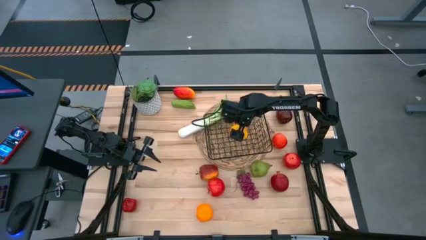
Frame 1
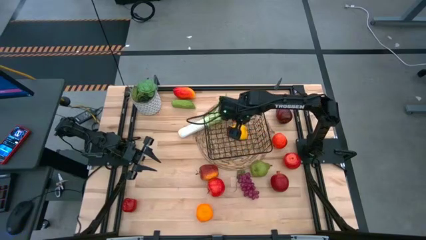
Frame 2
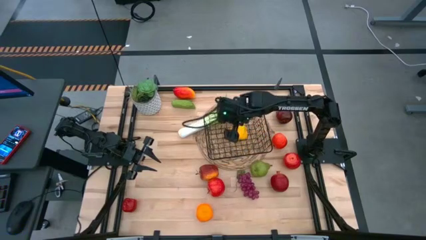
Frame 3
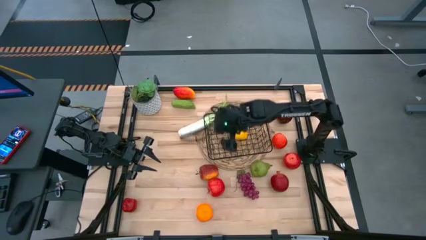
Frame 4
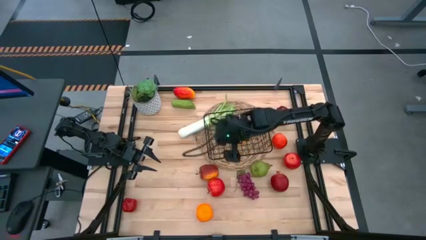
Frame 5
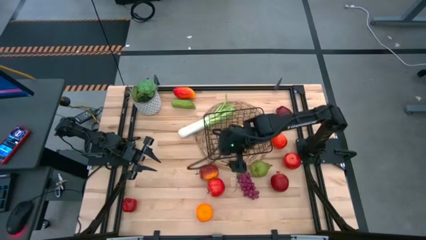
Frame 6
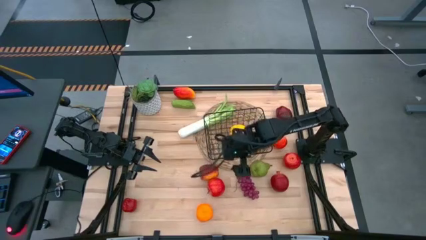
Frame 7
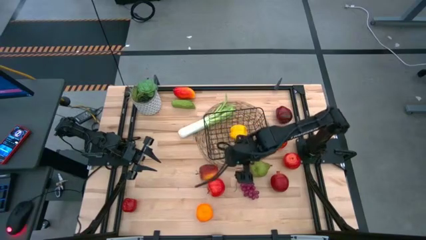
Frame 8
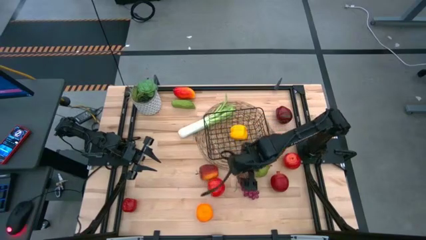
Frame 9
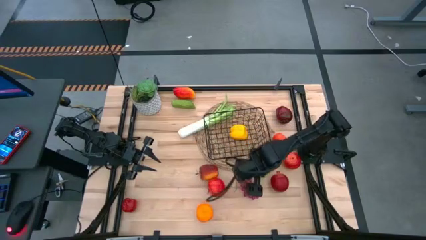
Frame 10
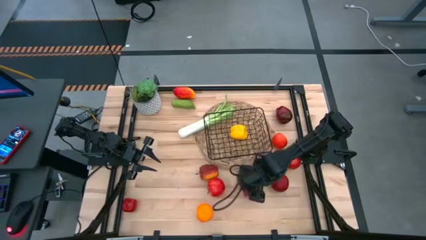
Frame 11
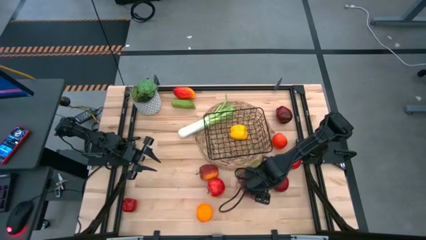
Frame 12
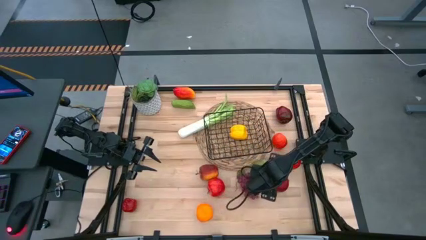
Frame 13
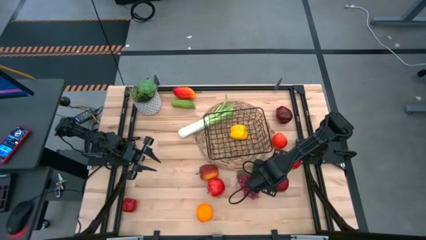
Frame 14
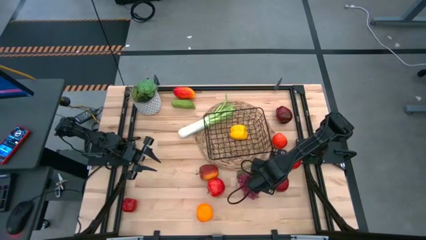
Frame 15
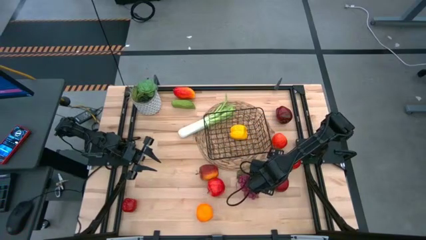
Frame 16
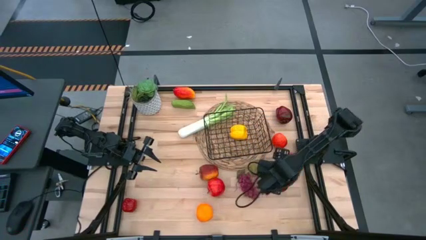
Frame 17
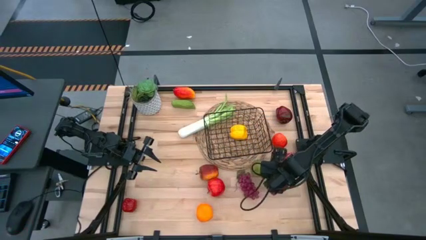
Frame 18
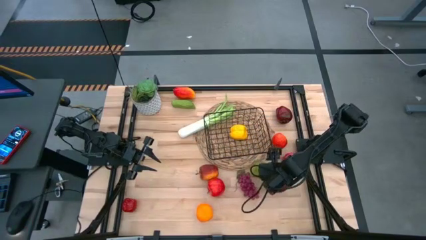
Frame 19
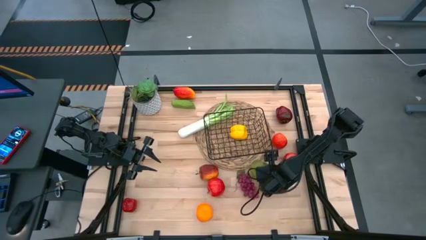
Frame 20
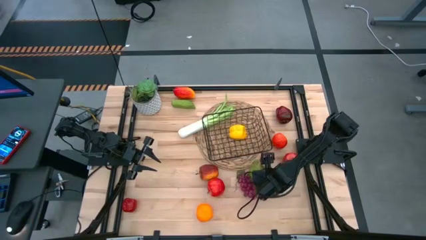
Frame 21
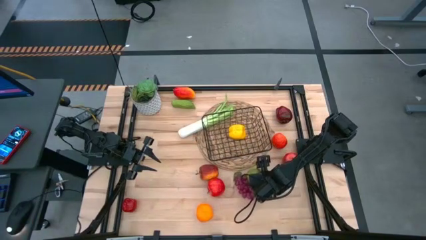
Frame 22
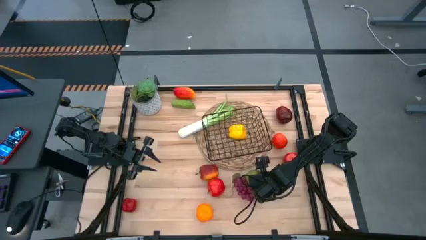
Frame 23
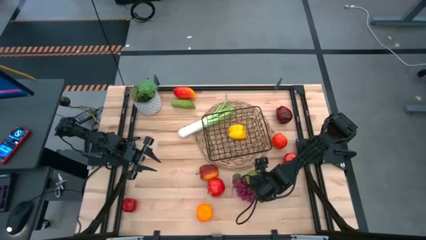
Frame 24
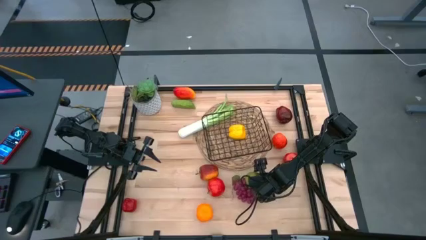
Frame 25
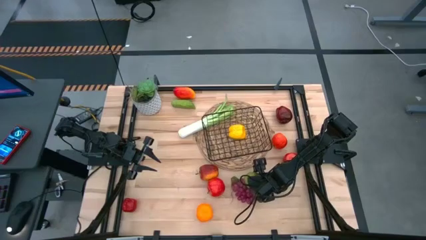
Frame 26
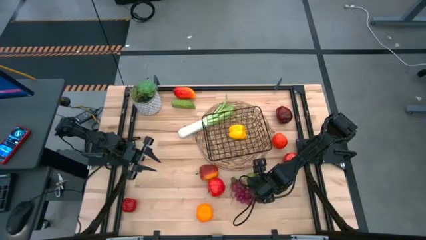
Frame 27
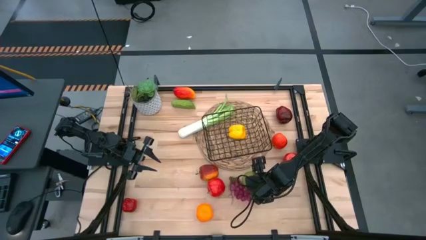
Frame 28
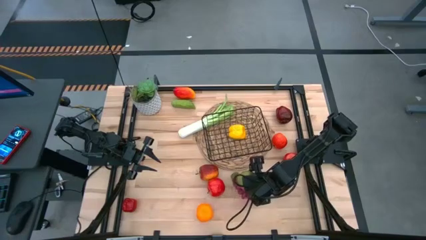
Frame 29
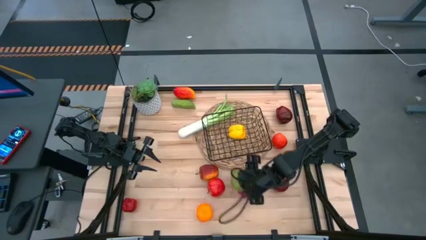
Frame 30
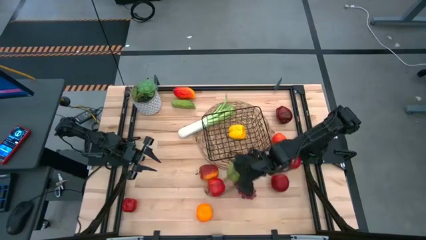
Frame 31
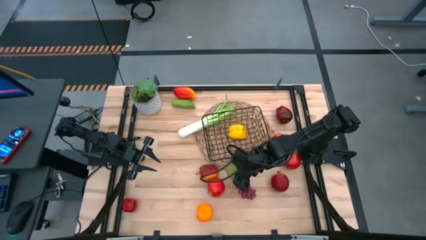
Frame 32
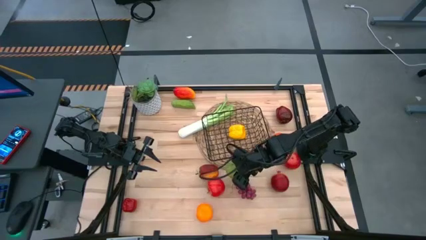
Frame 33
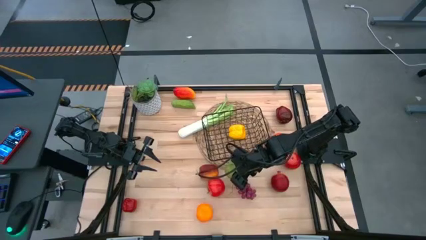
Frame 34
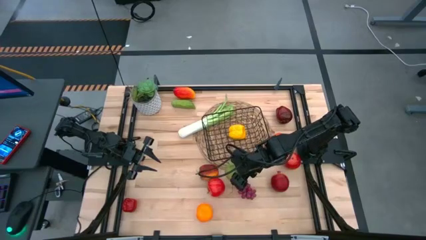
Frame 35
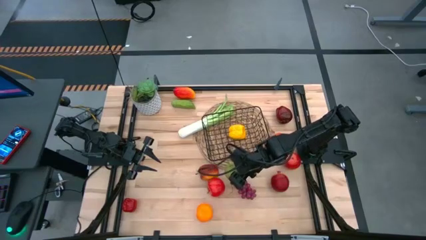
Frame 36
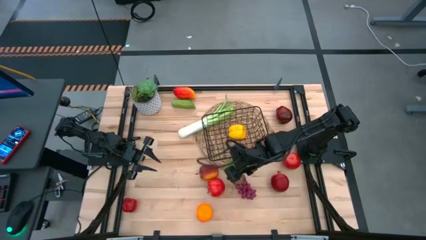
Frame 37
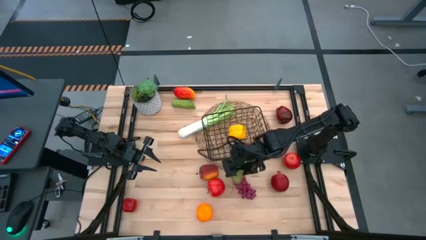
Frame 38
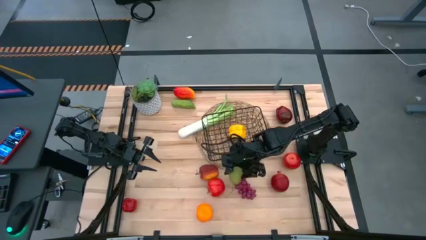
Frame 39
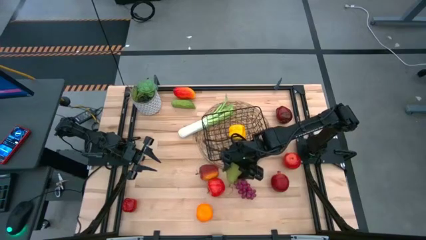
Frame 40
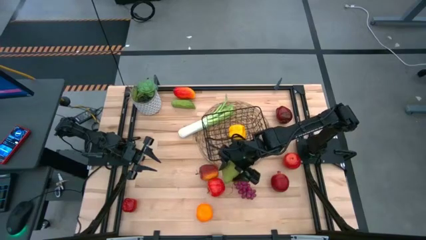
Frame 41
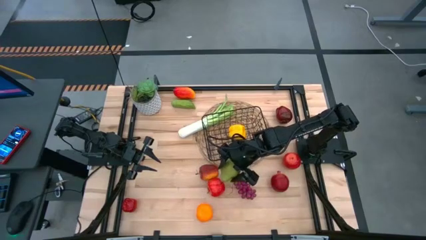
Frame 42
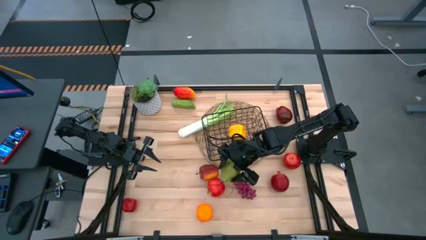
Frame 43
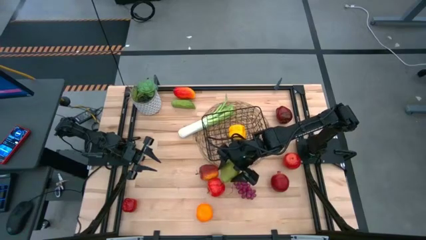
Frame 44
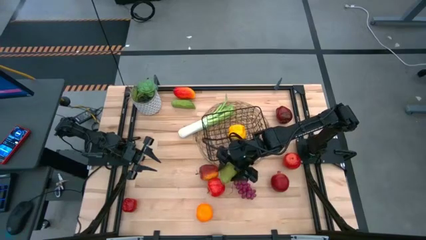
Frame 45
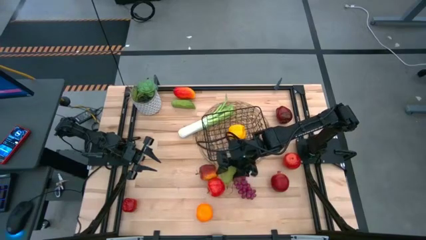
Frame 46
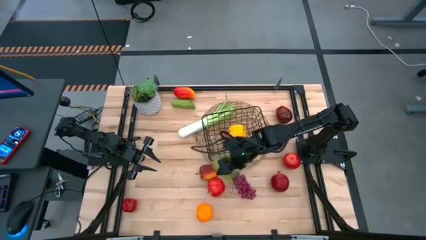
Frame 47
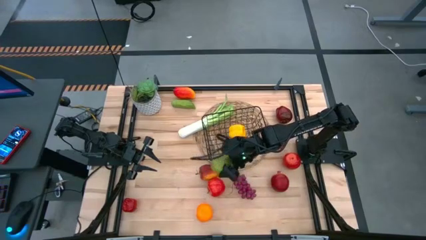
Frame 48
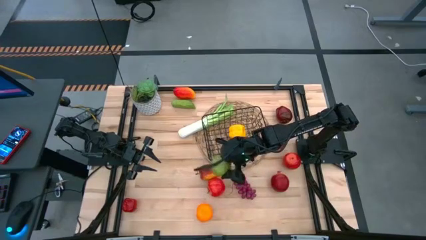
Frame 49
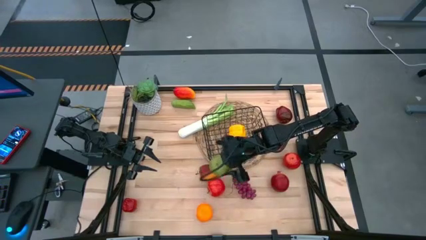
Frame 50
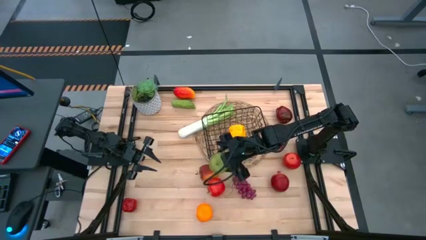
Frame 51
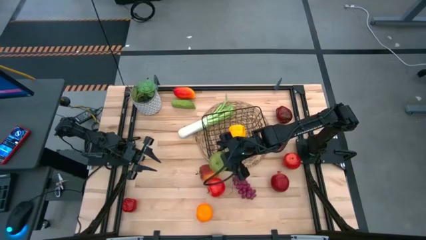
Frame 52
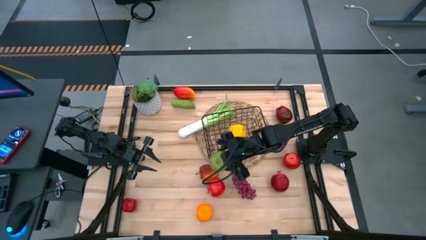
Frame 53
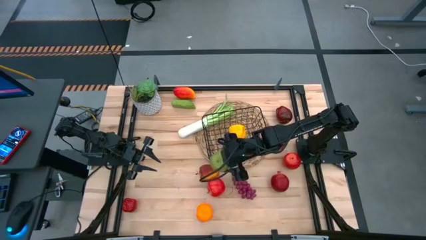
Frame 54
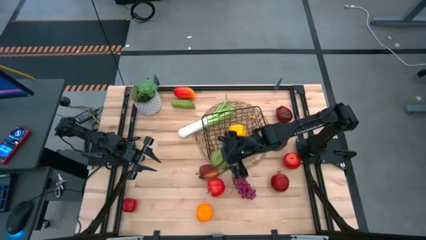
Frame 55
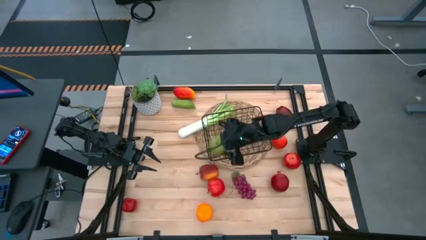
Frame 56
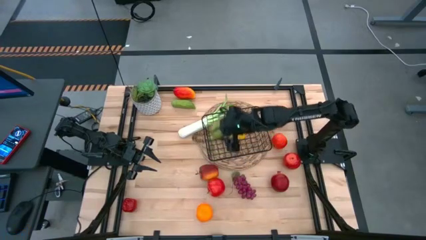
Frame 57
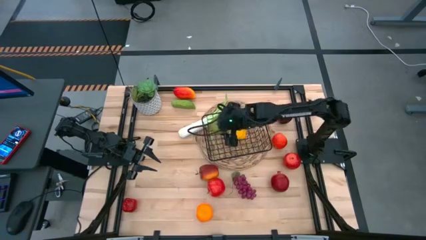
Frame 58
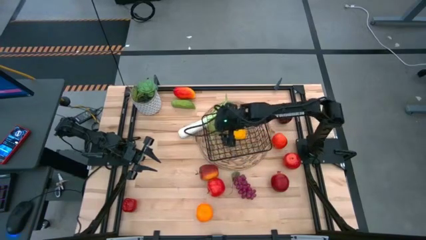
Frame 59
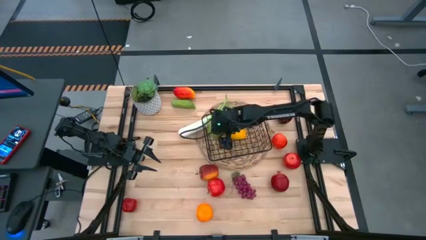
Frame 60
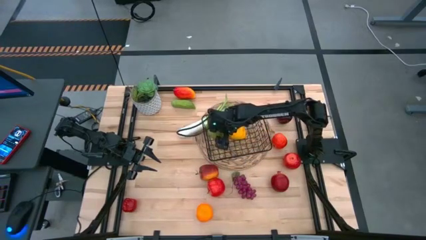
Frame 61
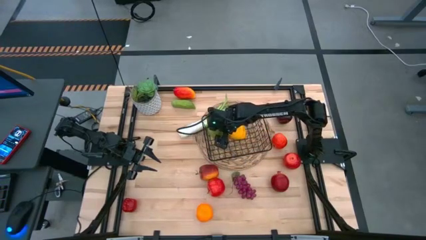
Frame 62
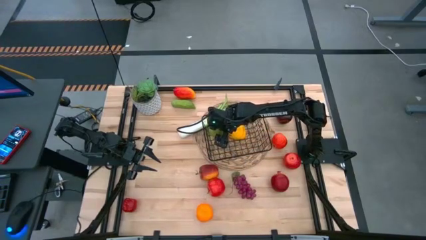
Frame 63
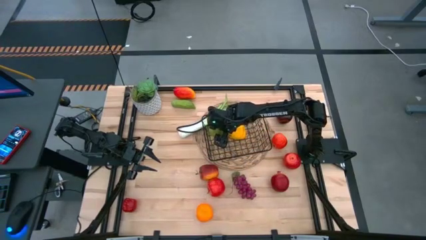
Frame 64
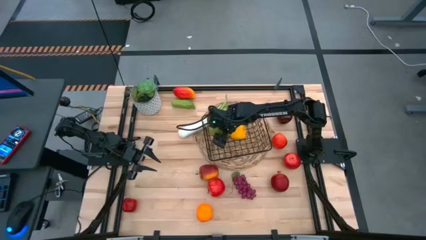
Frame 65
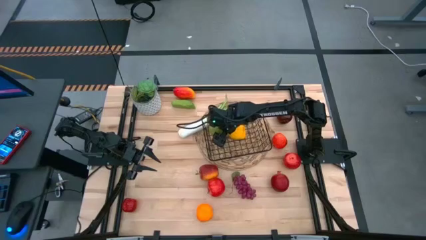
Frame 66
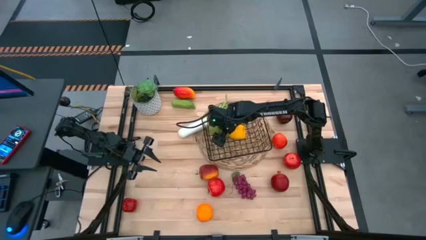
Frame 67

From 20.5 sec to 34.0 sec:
Task: Build produce basket
Put the pear into the wire basket

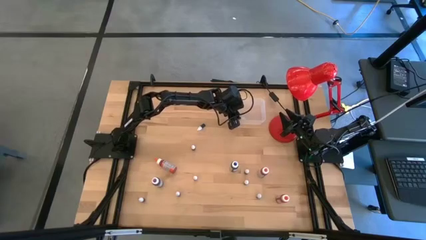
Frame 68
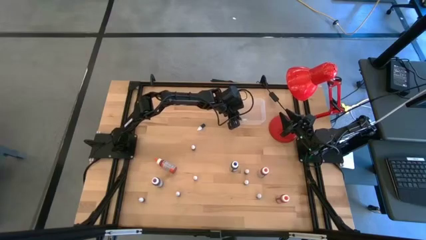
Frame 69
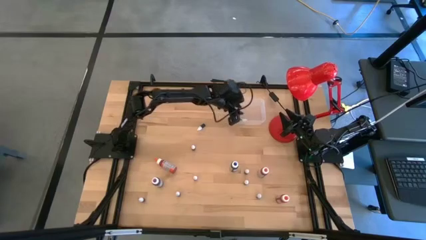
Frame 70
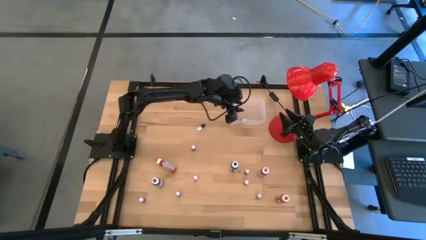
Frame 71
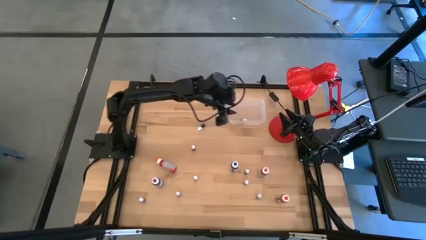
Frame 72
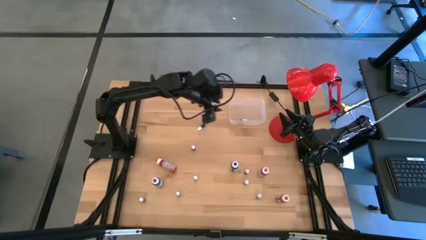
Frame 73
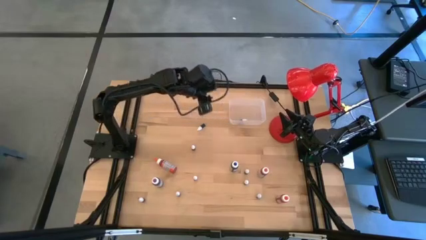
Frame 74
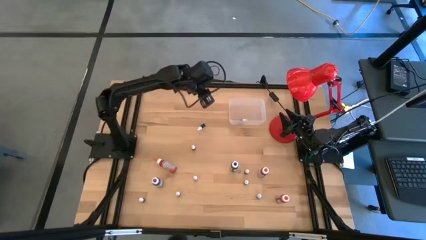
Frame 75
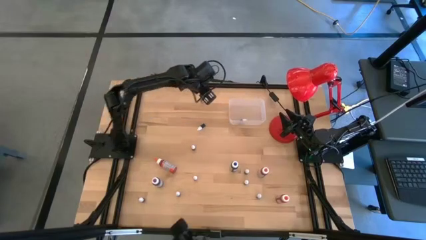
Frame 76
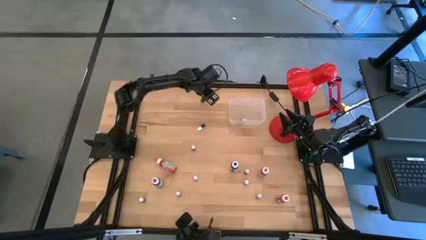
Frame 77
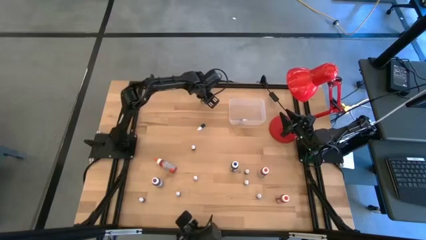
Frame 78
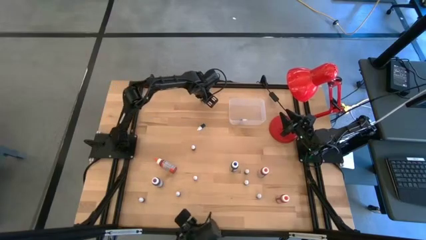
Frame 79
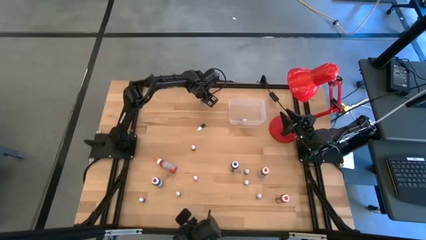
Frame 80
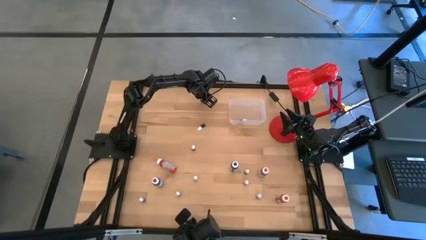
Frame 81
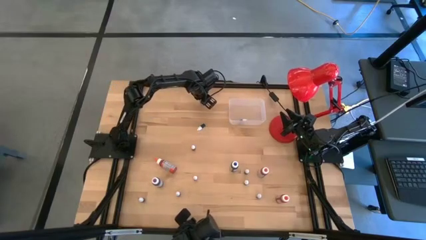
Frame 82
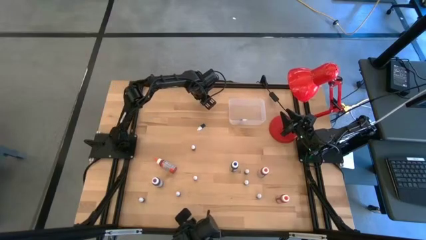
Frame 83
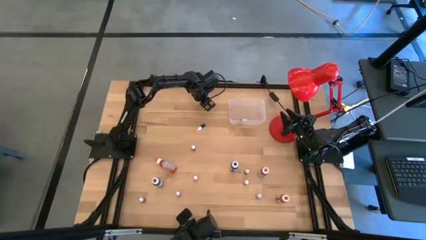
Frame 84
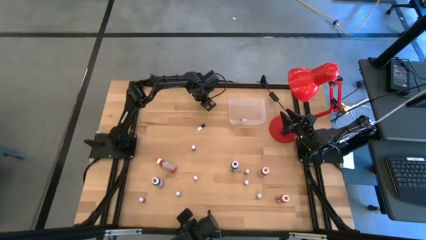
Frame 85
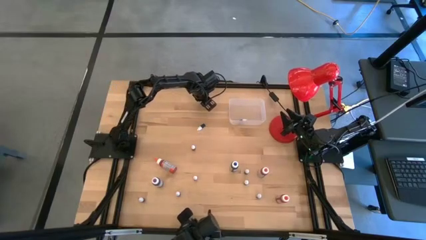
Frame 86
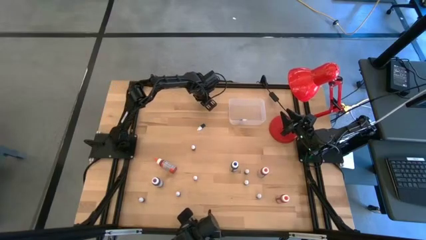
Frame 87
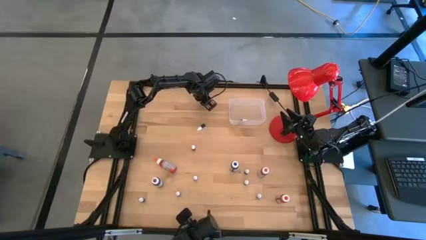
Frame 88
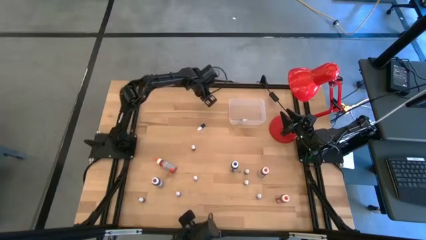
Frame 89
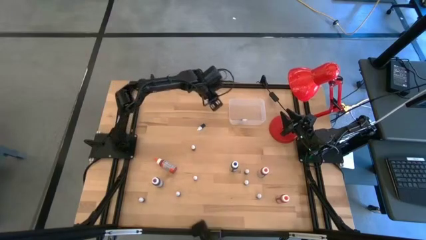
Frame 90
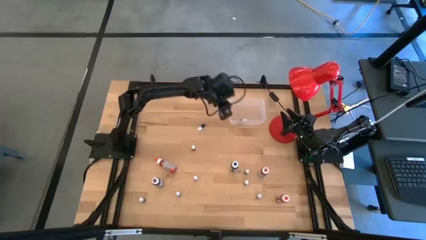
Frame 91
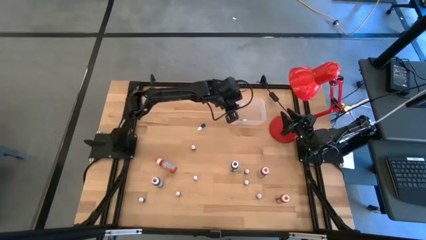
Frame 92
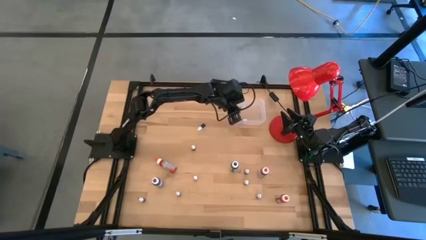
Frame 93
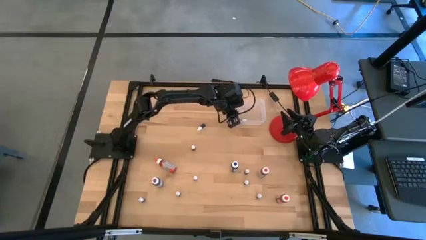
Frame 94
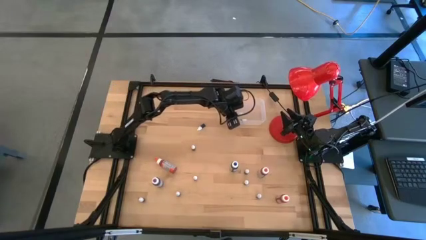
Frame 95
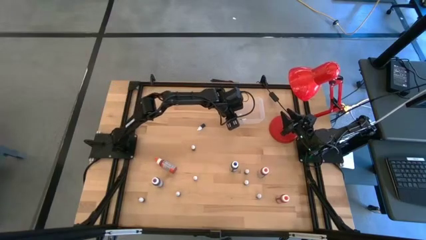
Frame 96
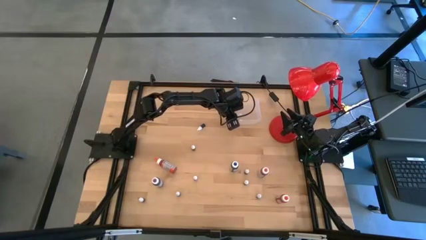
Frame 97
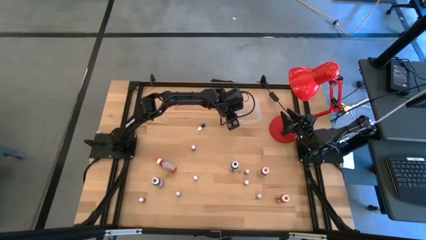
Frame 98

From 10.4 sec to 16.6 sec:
Task: Pick & Place food coloring
Put the small dark green food coloring bottle in the transparent bin
